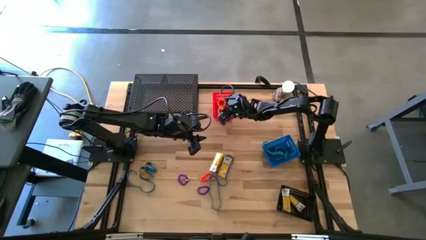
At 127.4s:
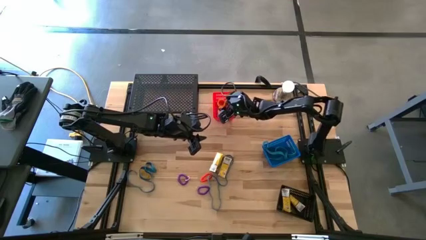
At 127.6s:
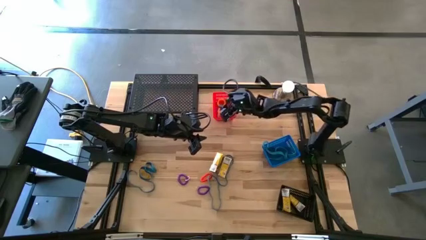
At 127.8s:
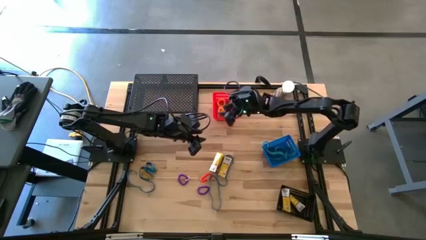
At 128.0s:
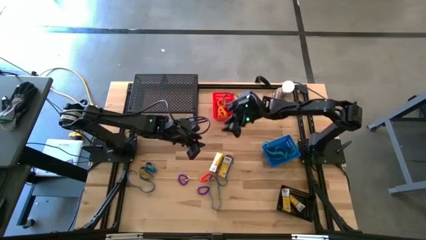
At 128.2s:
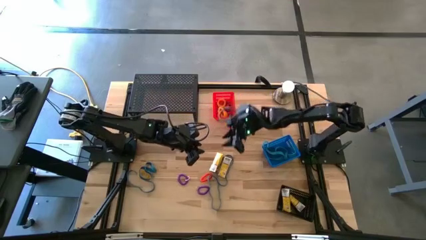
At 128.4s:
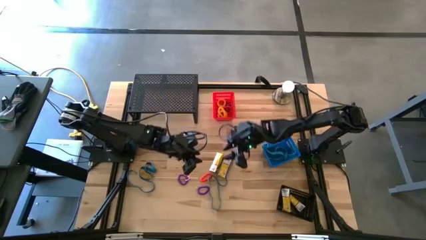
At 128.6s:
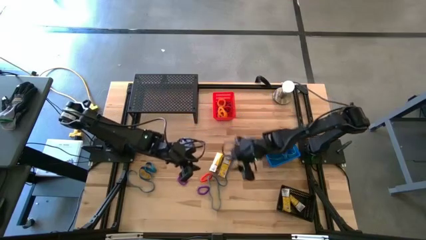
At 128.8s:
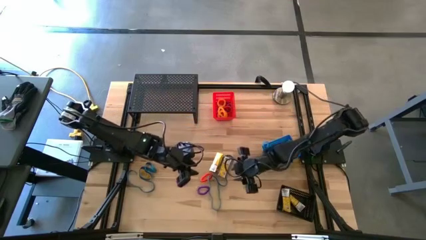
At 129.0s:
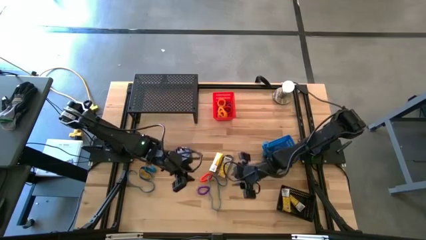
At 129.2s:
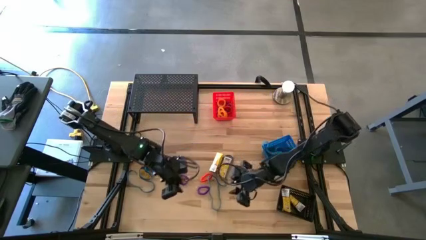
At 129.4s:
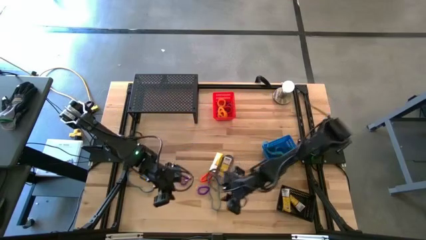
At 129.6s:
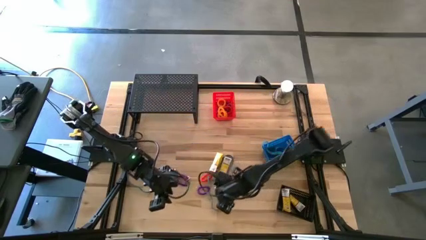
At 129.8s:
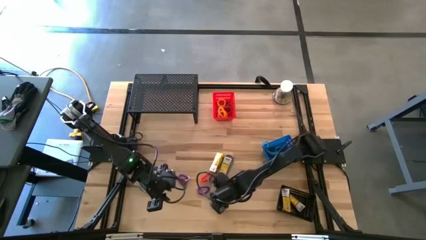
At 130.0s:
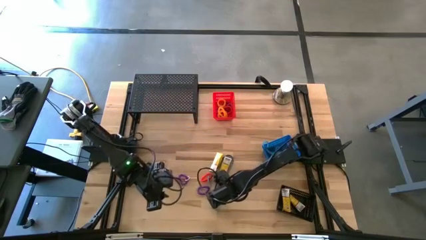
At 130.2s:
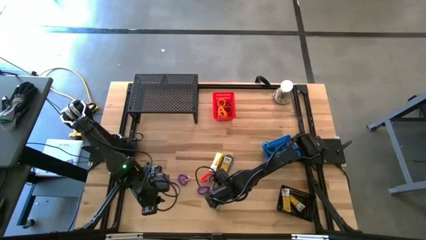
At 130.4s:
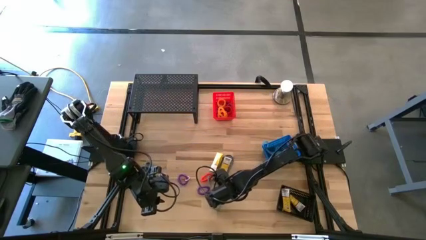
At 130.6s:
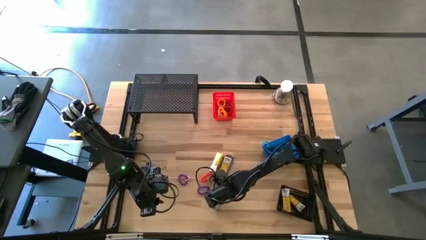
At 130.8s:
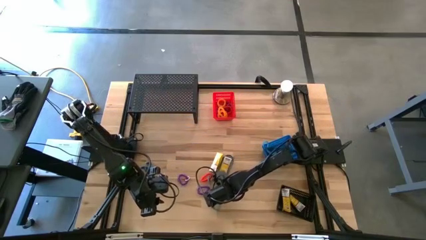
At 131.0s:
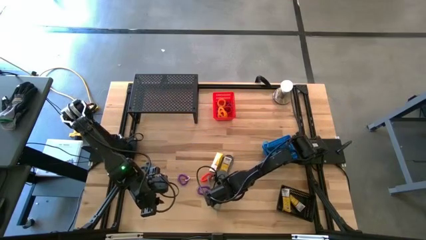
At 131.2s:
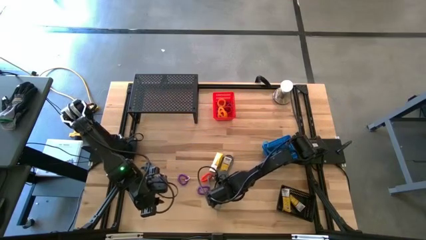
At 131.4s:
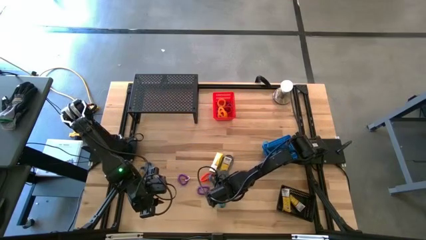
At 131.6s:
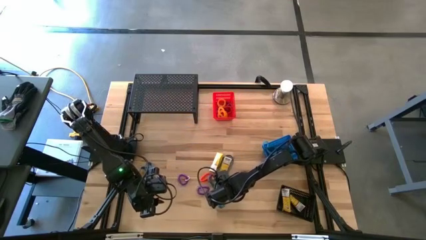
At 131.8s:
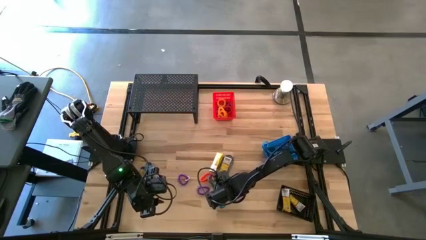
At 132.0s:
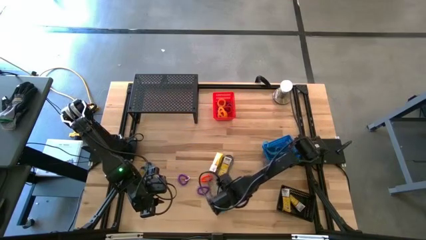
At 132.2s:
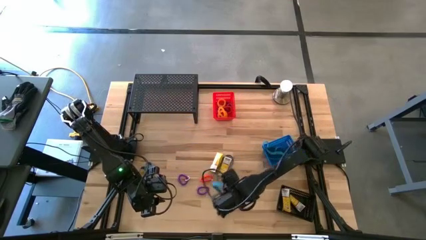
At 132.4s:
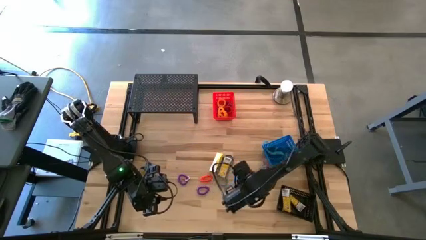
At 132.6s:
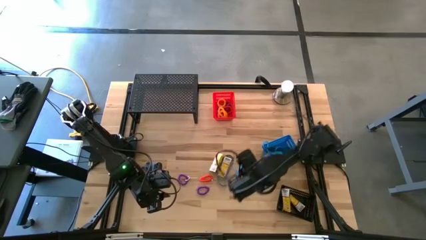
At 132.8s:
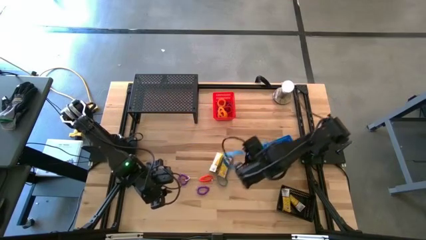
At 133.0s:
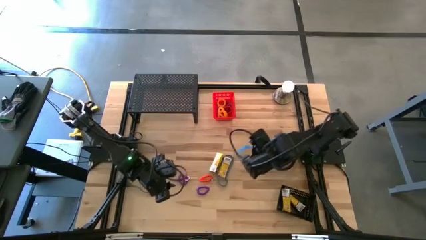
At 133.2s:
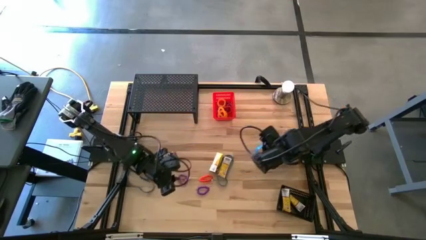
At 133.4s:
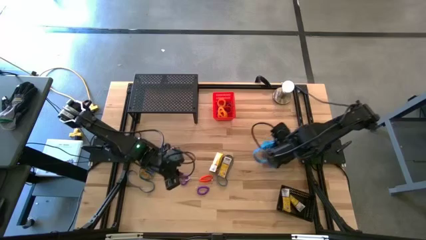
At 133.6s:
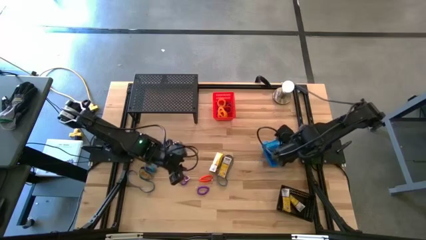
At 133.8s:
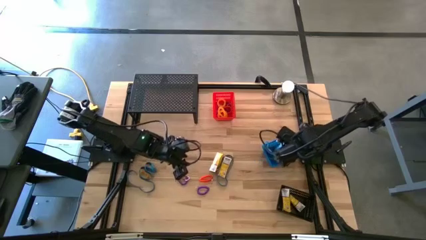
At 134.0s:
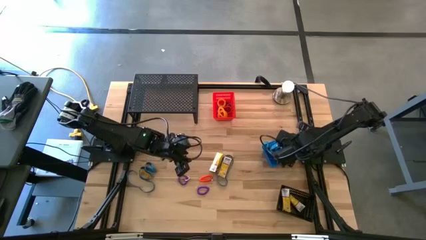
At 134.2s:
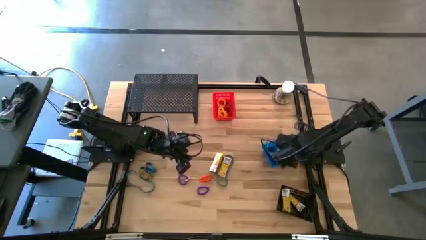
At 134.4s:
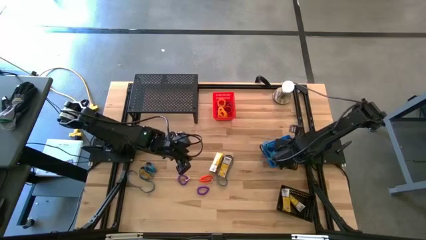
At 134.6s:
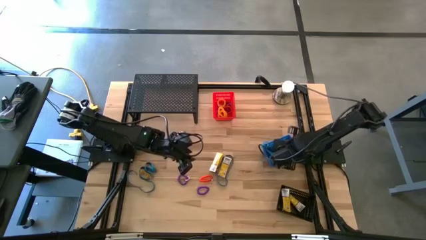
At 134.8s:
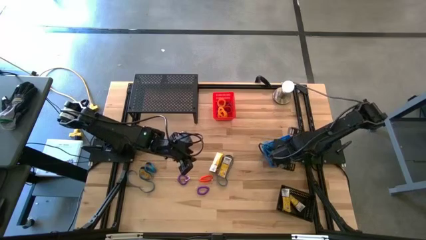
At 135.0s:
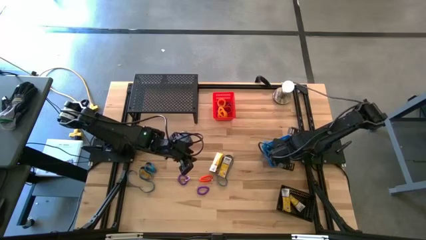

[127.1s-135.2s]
Task: Pick & Place Office Desk Supplies
Put the blue rubber band into the blue bin

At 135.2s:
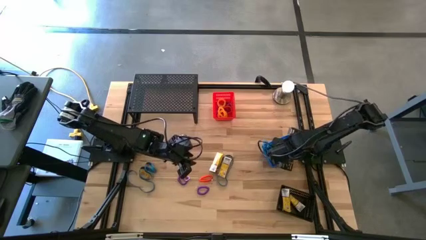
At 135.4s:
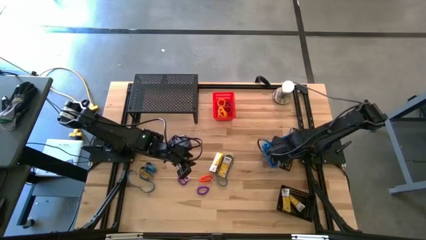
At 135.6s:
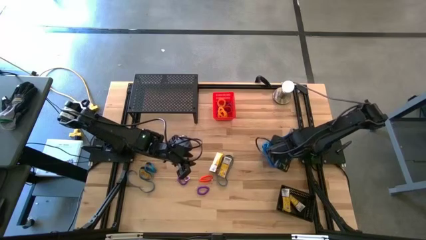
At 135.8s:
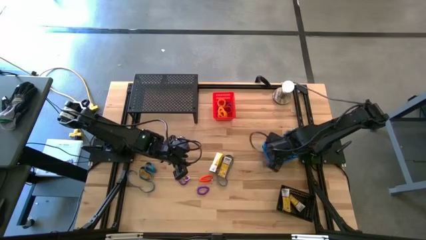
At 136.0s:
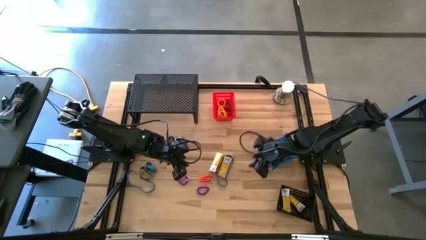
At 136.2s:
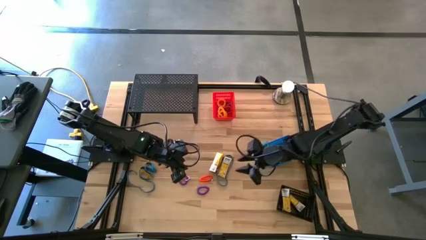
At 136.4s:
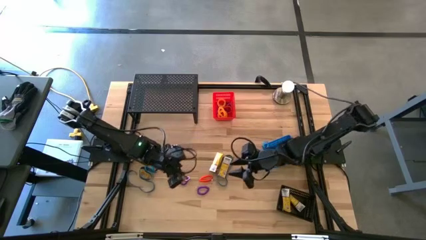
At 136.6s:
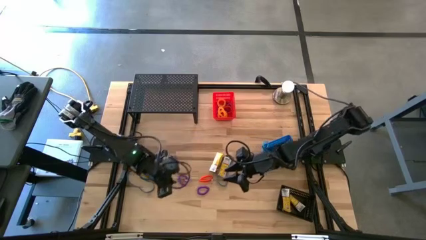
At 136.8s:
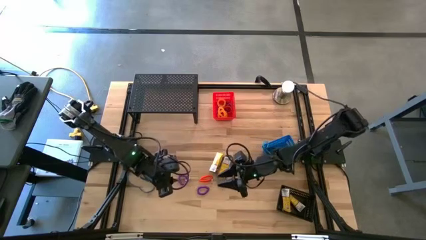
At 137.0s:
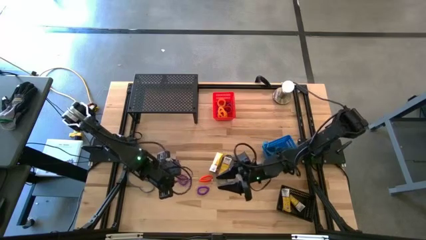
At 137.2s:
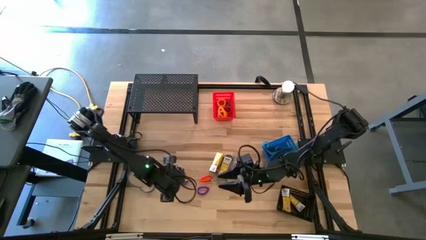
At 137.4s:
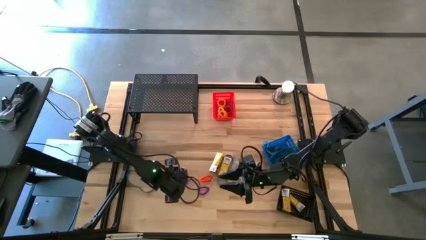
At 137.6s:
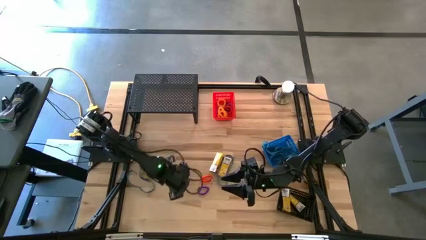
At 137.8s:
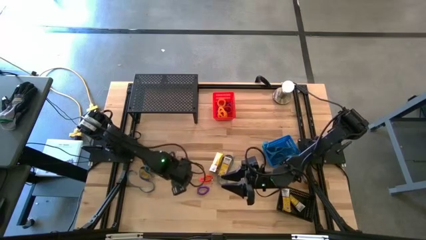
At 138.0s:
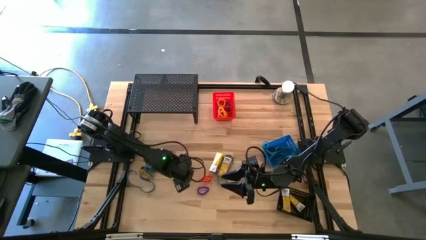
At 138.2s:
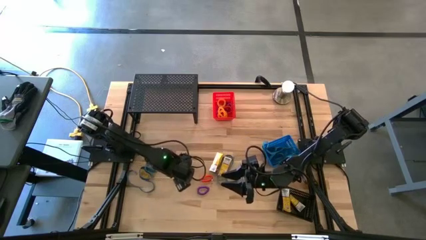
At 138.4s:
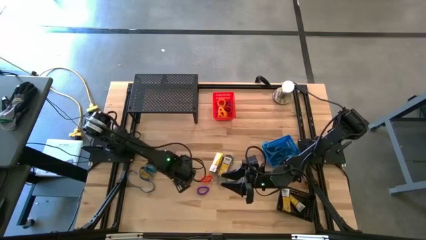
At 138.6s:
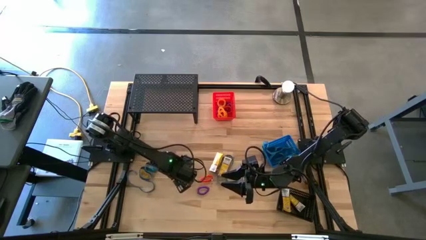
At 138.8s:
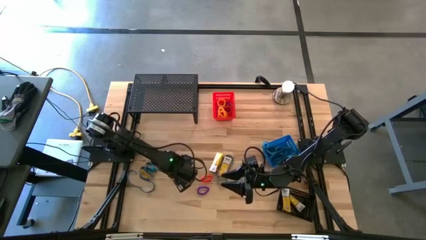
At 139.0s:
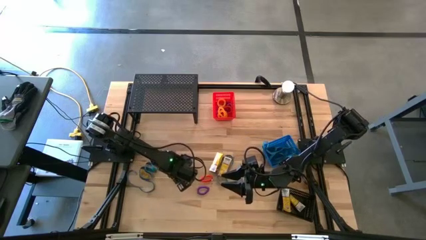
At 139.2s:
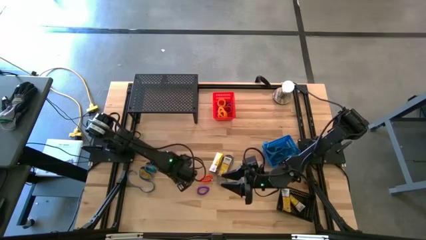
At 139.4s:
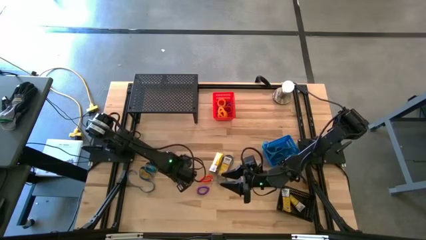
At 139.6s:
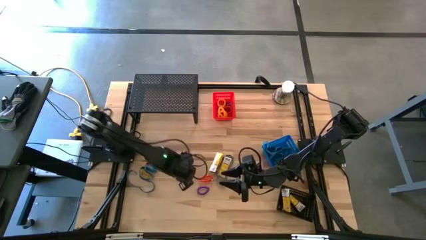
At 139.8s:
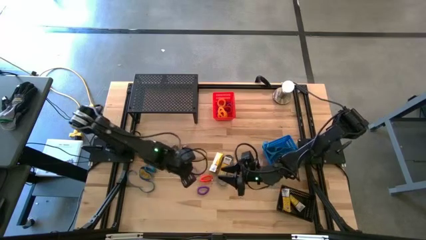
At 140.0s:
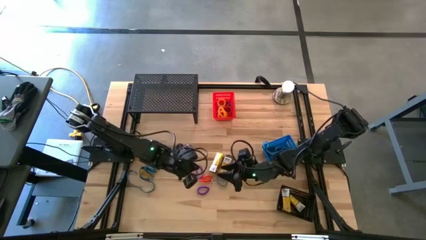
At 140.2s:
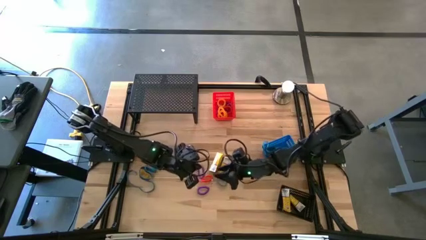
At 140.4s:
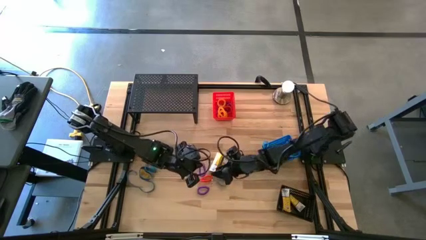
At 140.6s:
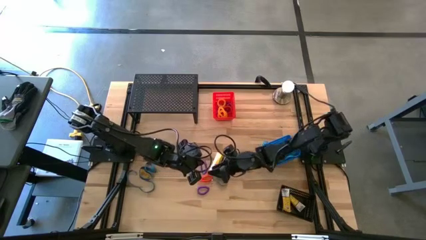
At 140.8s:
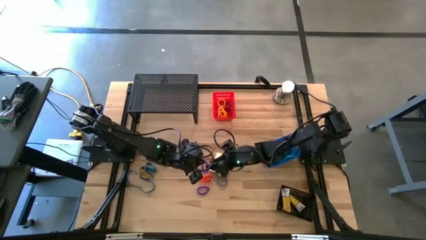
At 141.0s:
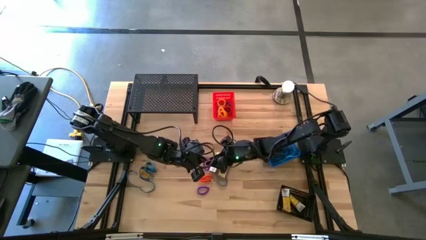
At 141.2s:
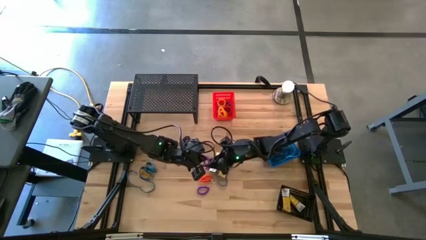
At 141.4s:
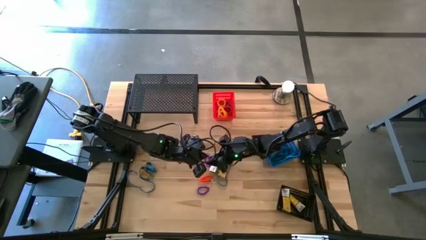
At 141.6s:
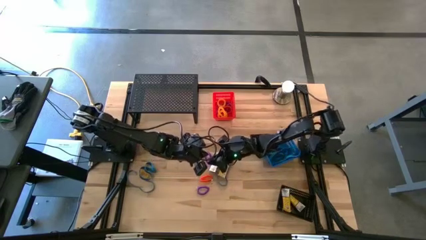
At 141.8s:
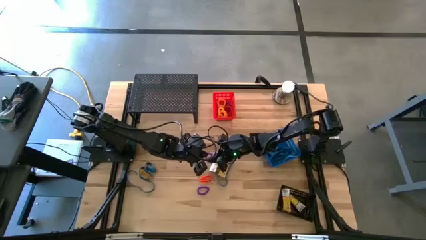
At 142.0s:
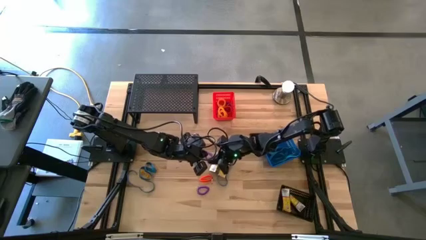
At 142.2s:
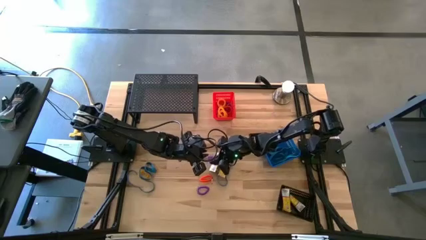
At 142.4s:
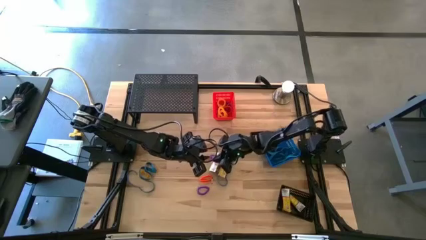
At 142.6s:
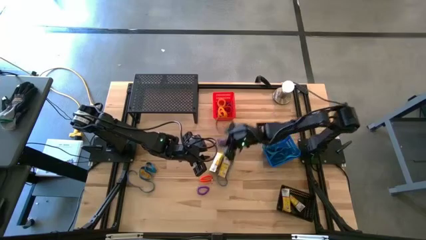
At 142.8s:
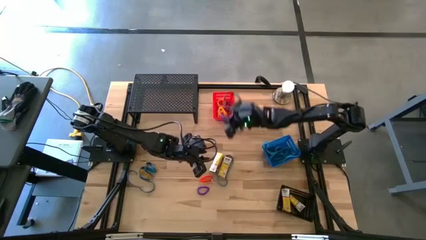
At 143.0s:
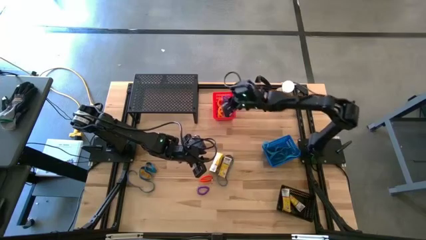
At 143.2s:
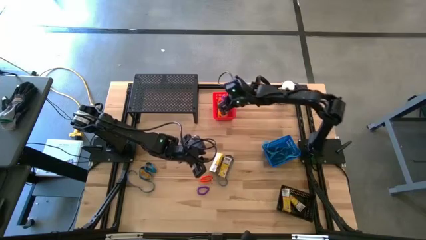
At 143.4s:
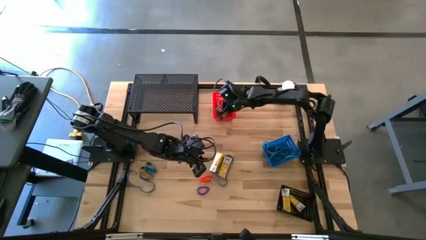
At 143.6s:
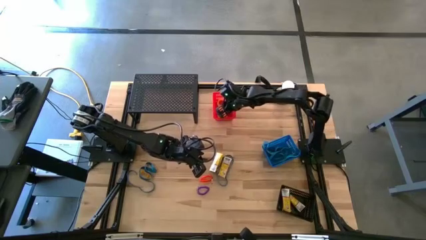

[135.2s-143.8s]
Put the violet spring keychain into the red bin

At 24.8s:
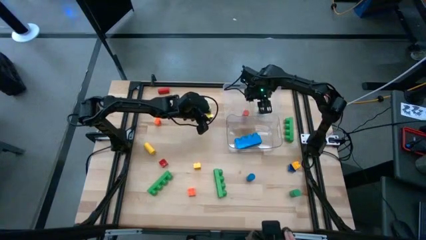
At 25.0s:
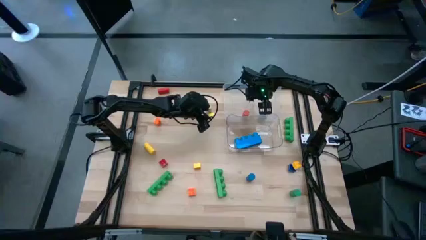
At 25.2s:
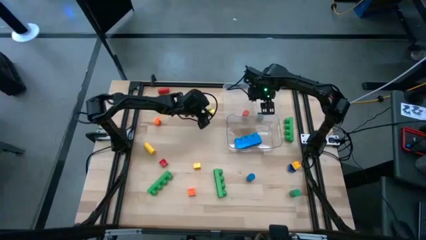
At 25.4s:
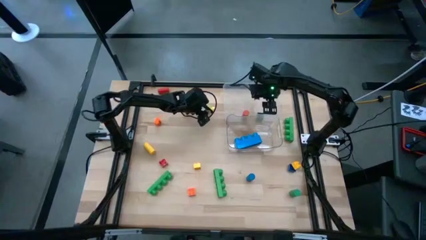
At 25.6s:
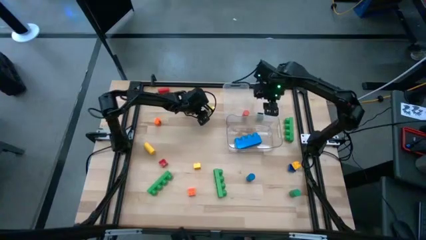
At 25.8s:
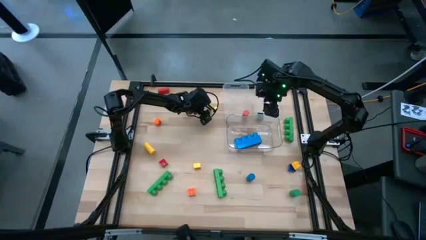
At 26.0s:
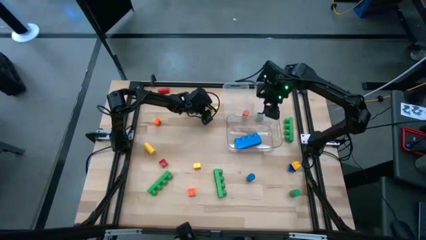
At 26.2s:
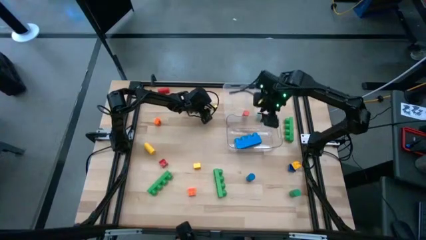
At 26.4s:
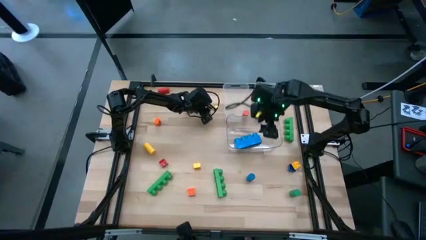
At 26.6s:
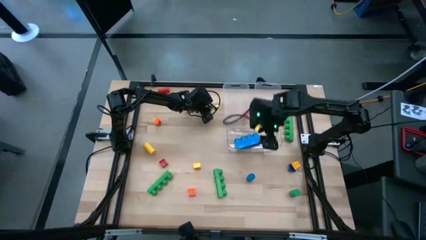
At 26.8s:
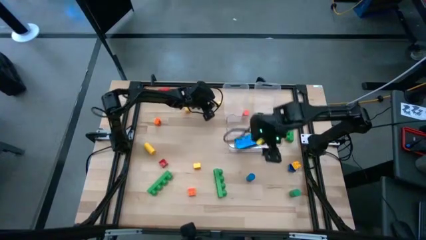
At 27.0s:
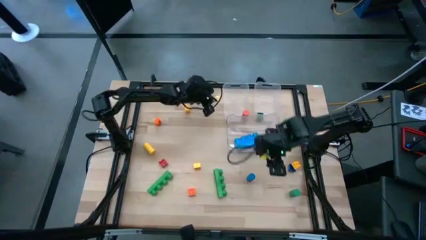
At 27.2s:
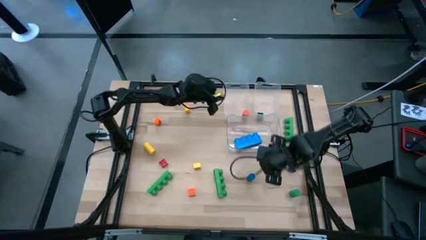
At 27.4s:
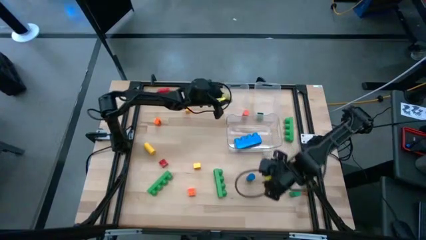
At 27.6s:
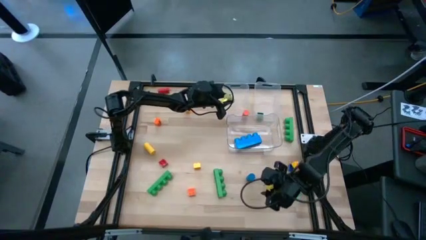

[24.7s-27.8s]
Task: Sort blocks by size
Put the light green cylindrical block into the left transparent bin
